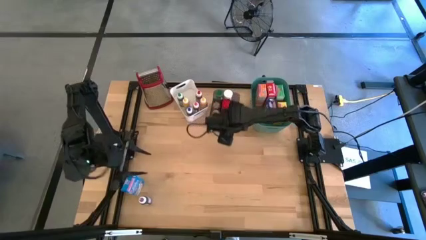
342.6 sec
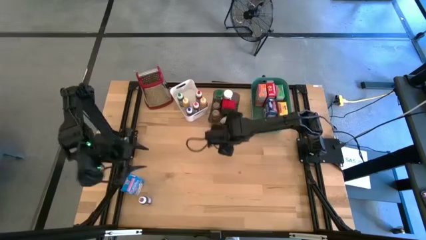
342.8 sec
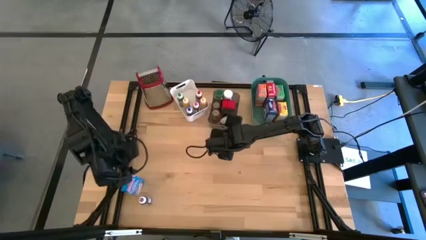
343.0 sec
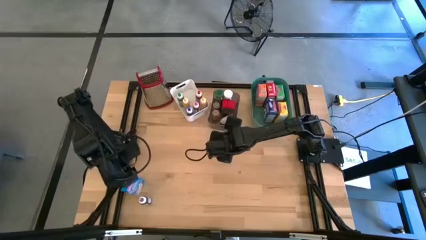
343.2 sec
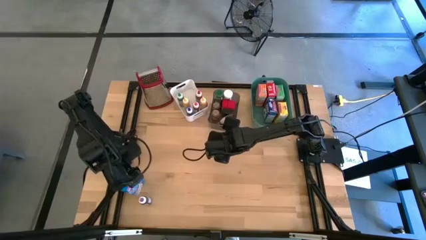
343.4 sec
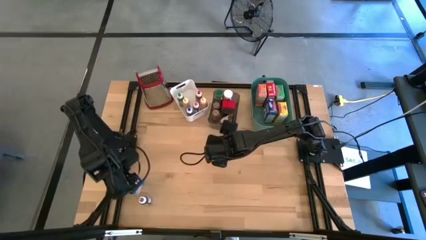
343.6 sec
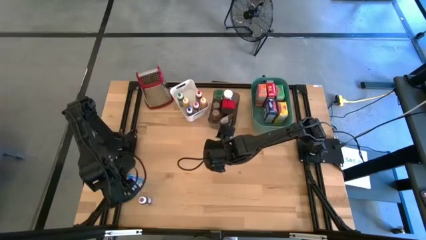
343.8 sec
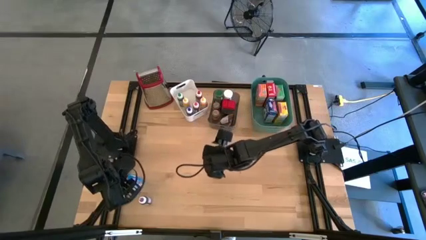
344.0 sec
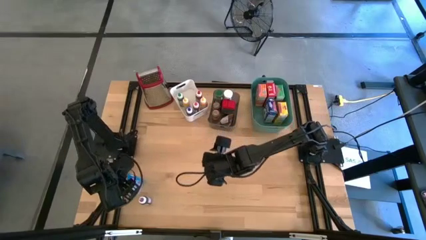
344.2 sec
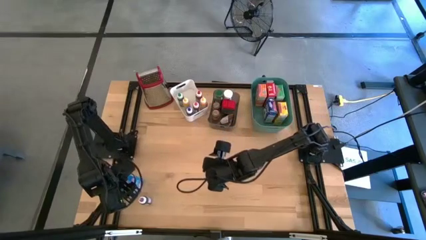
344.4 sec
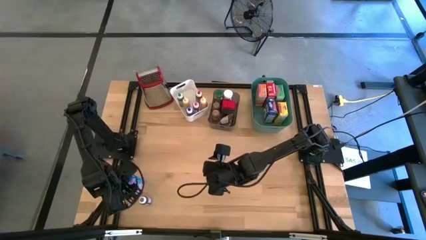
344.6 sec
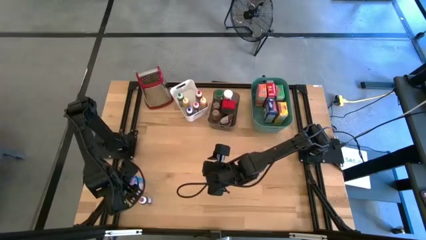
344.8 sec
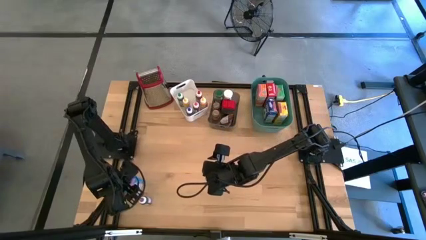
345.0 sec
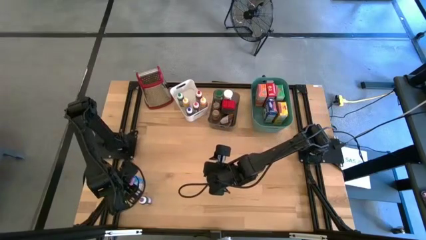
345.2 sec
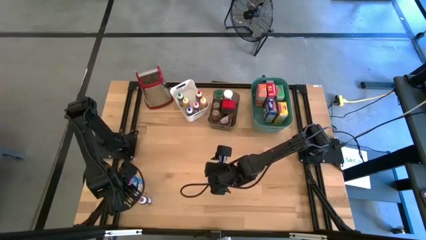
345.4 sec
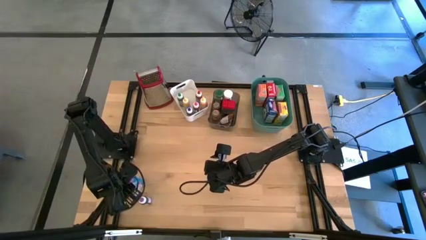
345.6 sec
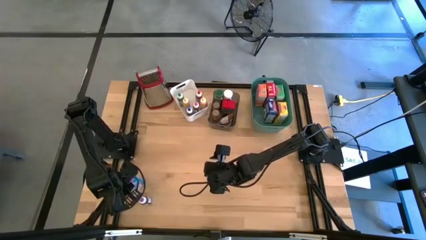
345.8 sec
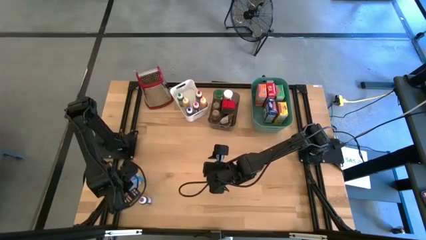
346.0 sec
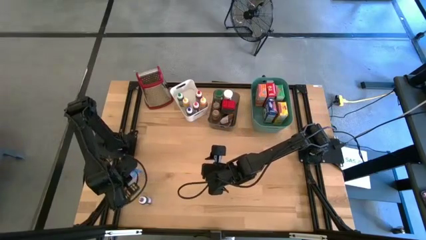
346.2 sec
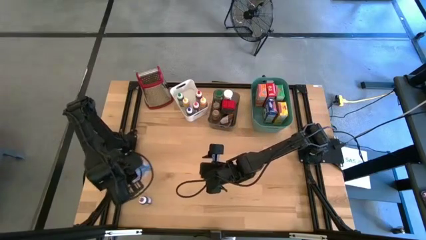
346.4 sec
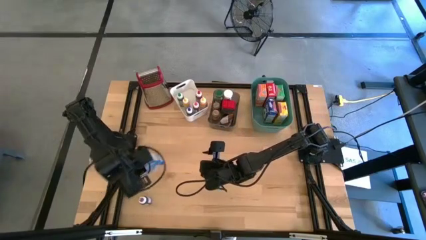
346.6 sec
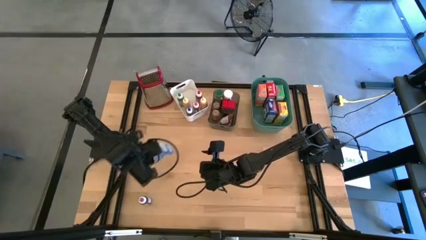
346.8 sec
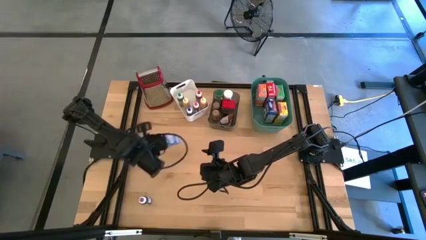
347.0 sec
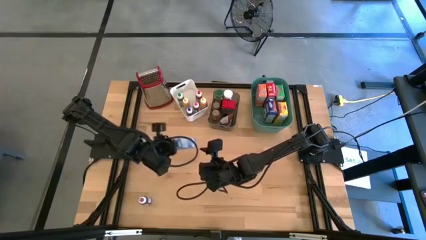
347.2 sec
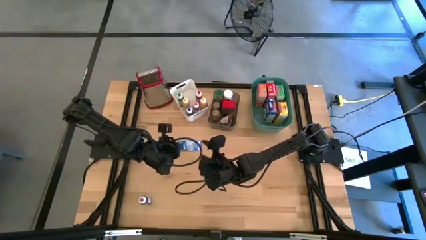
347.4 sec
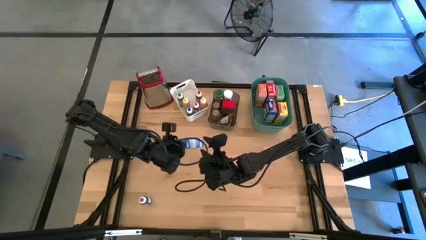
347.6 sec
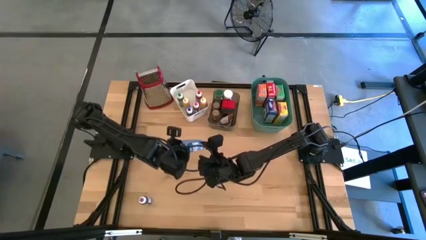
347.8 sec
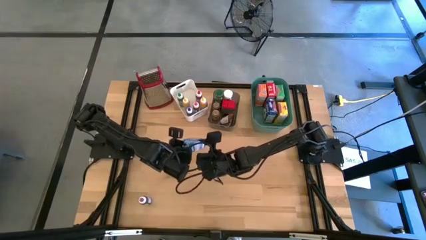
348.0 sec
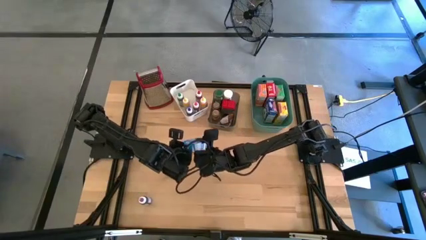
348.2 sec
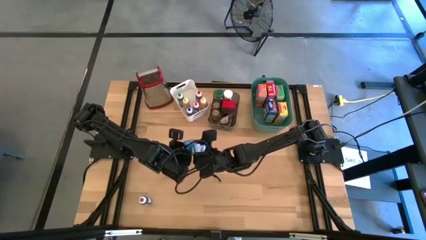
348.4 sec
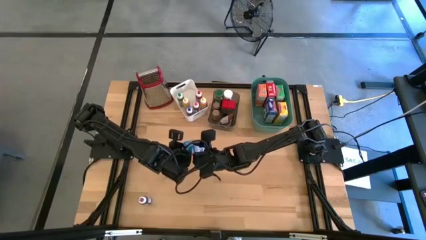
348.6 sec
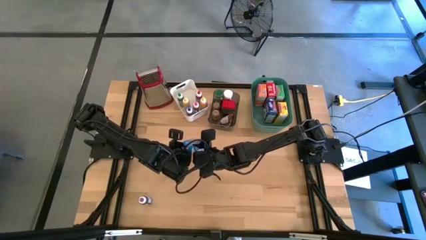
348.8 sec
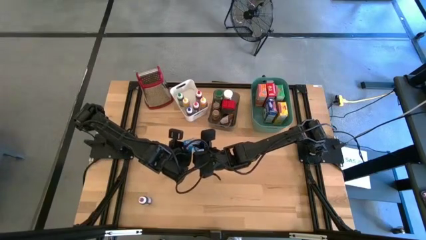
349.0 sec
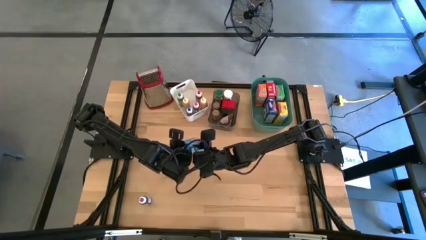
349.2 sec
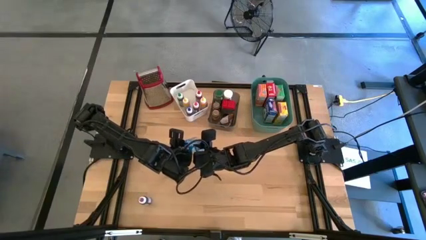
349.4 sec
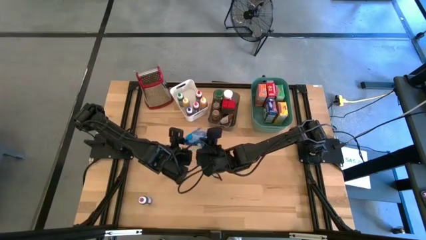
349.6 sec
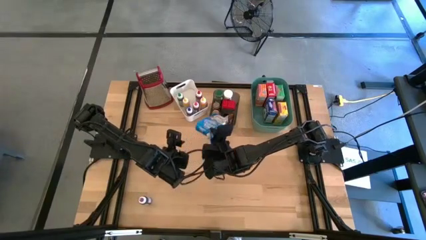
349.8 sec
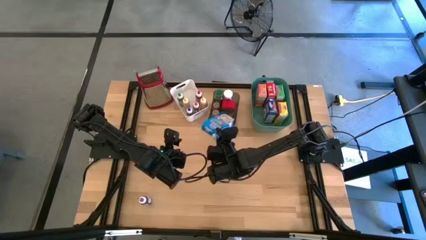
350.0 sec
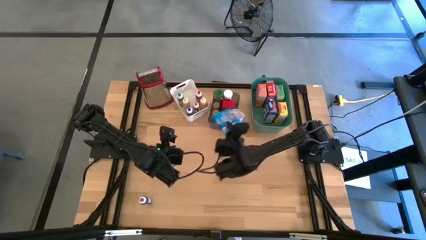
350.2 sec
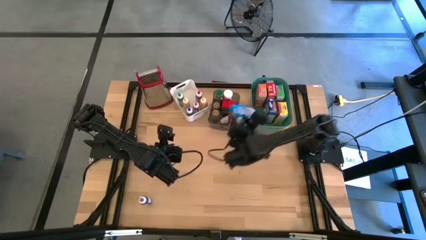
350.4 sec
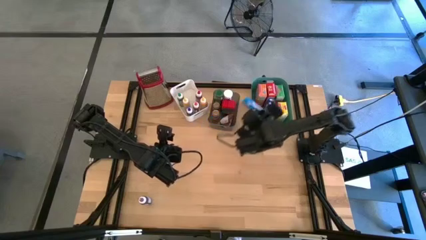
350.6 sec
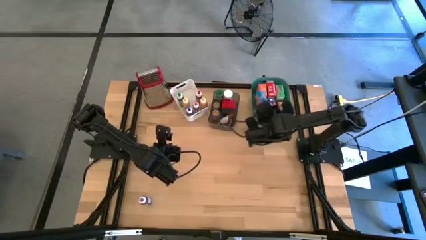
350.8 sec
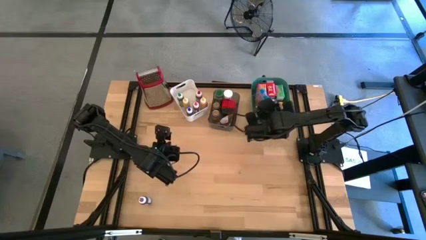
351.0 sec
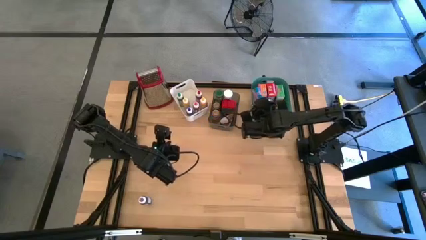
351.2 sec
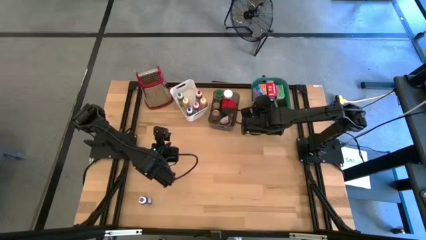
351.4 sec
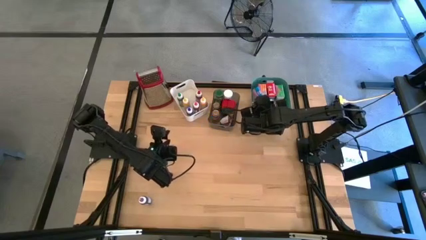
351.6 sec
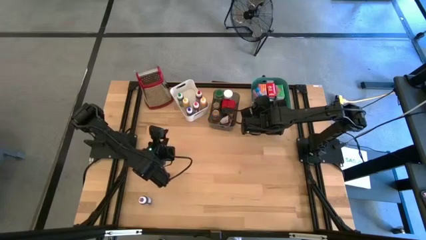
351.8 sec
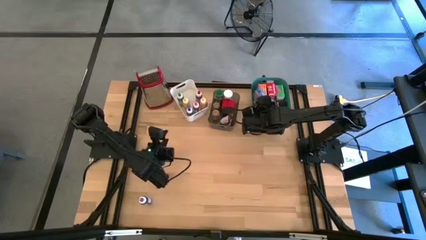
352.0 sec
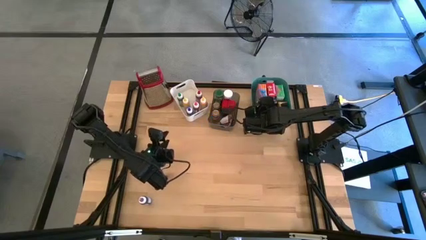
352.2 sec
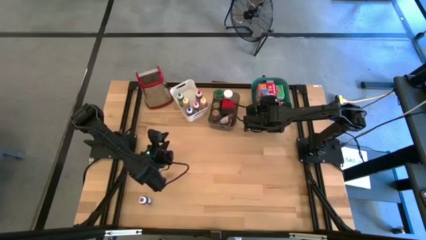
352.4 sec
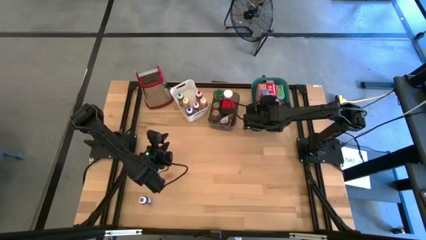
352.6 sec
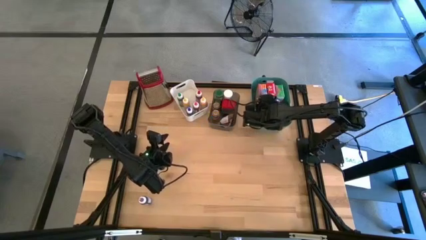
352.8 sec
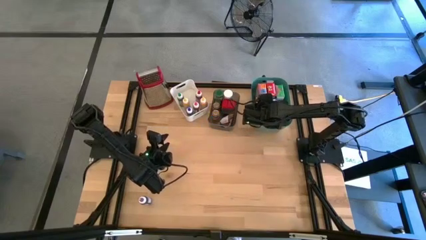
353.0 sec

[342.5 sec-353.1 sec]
Task: Pick & Place Kitchen Items
Put the light blue cereal box into the green bin

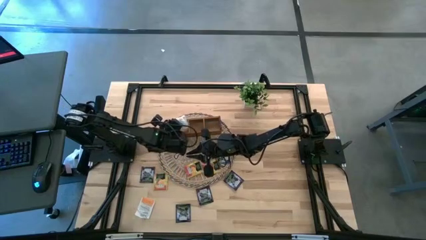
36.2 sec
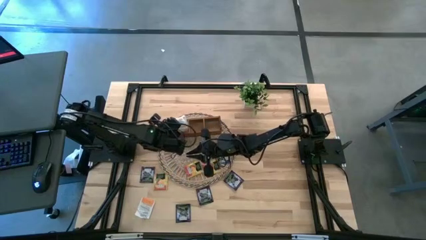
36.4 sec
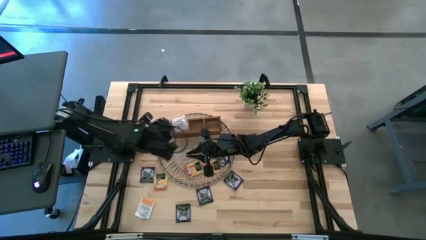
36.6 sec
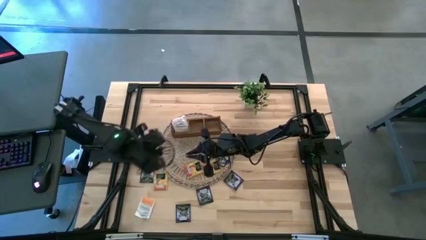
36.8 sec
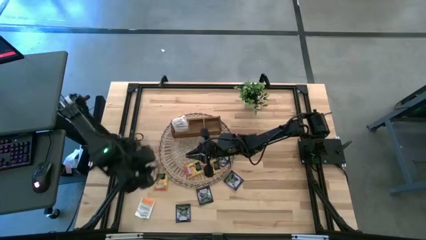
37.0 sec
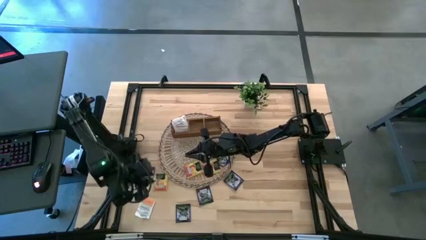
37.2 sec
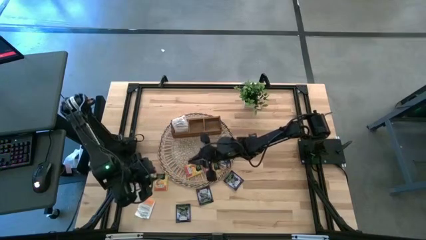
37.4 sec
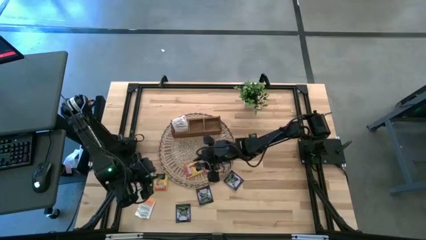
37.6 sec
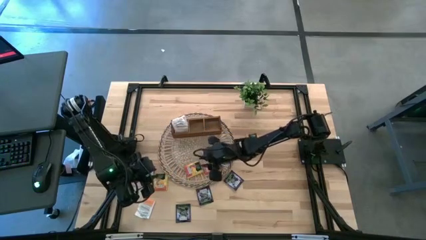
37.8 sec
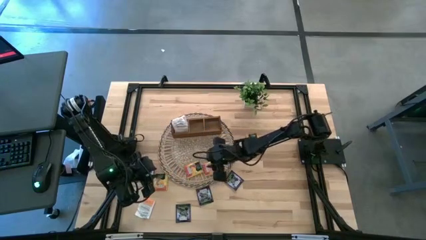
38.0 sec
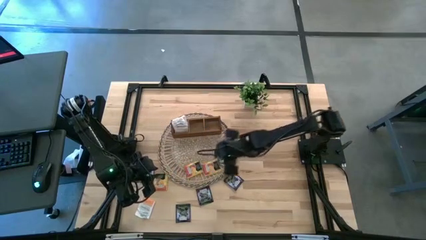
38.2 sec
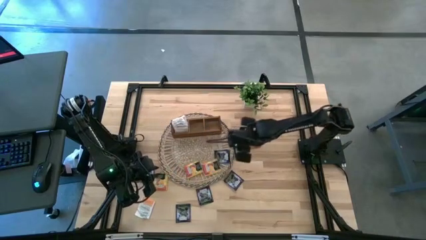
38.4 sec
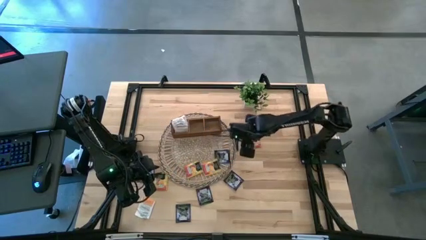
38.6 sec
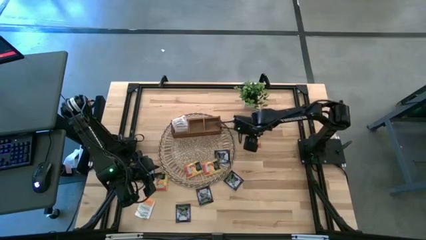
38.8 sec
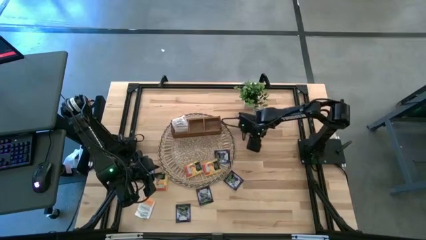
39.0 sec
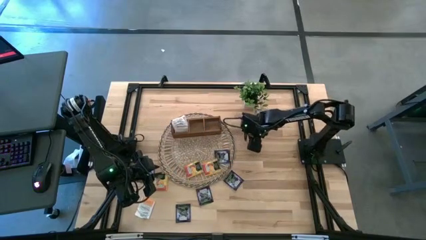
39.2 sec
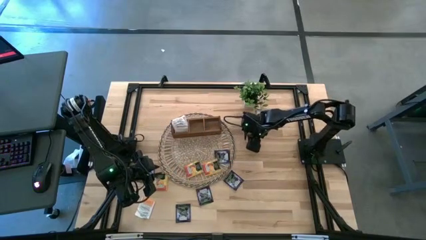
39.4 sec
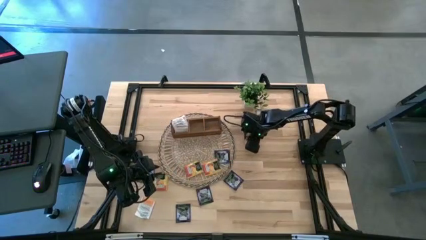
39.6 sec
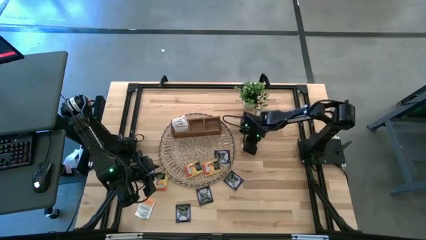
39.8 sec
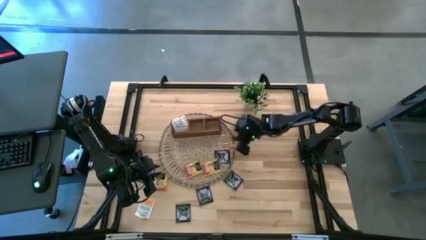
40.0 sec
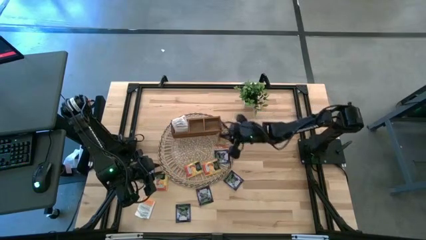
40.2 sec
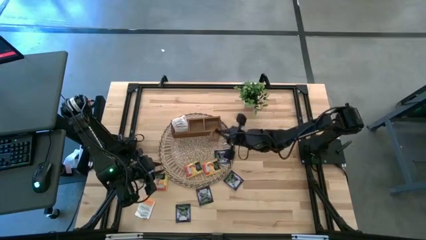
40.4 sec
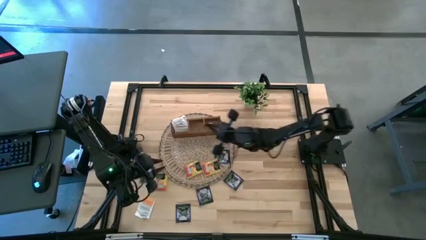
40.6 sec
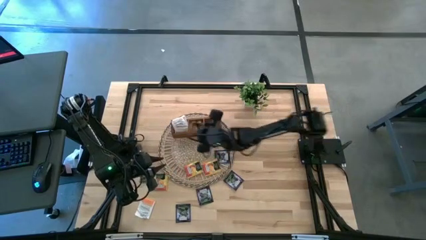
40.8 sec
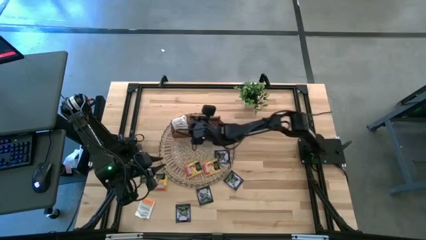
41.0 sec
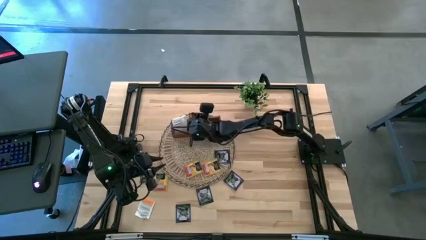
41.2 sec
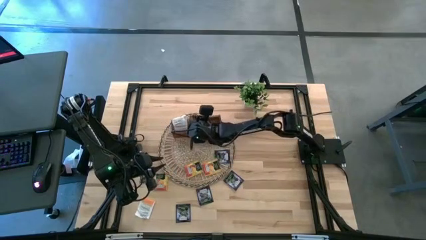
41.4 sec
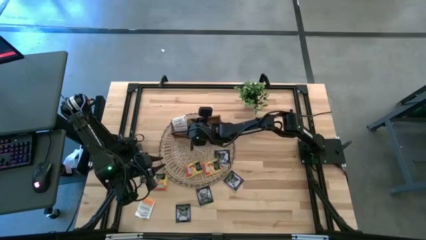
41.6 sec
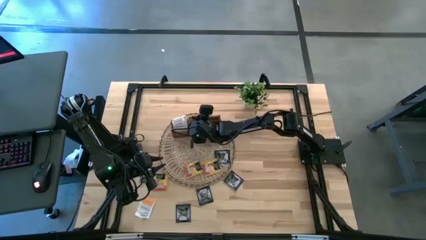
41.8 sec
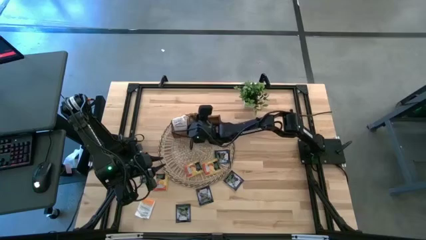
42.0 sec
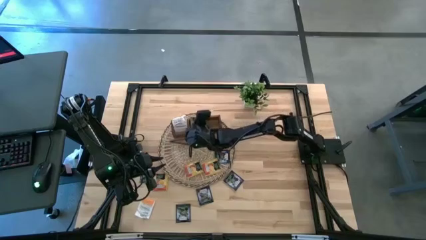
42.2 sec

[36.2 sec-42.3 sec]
Task: Pick & Place Tea
Put the orange tea packet into the middle compartment of the wooden organizer
